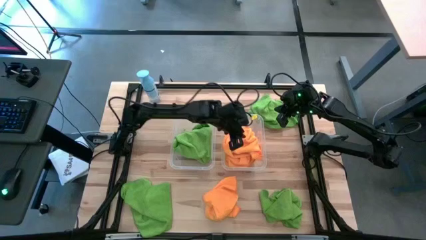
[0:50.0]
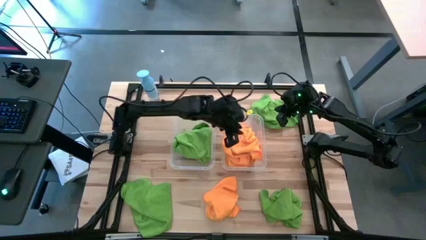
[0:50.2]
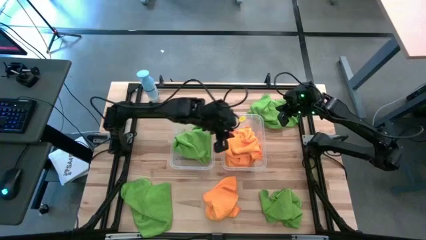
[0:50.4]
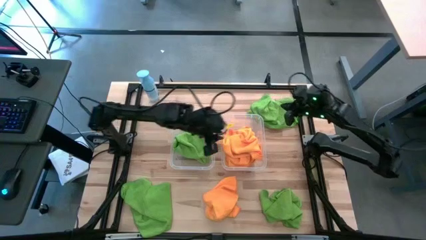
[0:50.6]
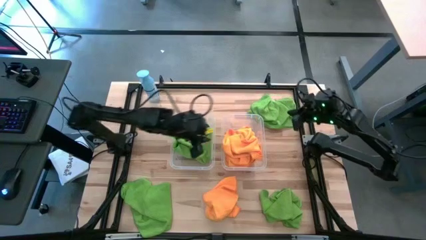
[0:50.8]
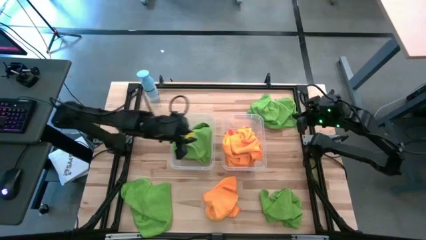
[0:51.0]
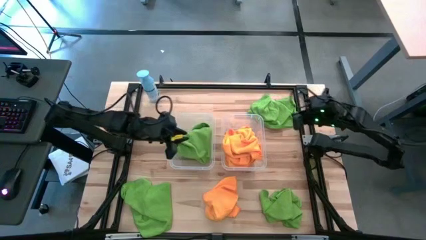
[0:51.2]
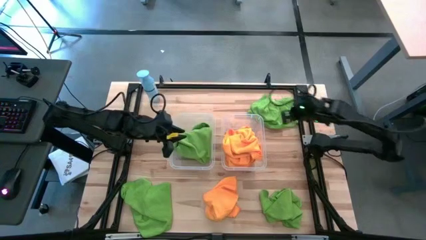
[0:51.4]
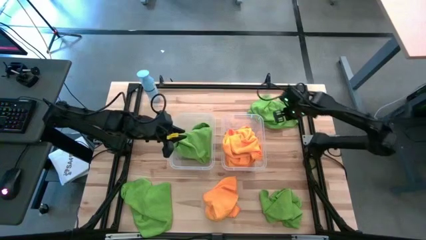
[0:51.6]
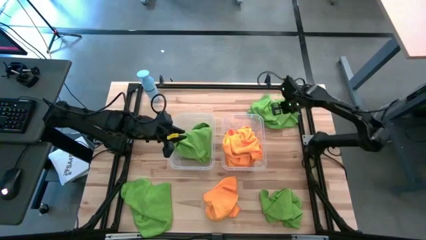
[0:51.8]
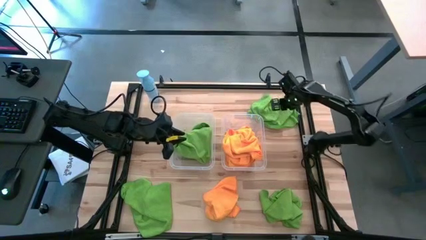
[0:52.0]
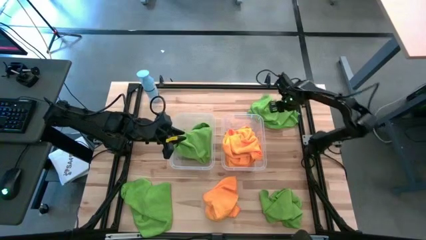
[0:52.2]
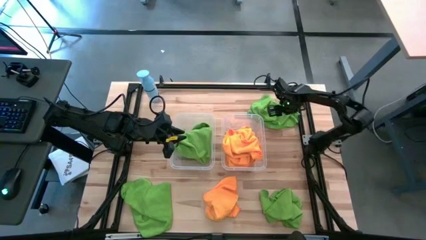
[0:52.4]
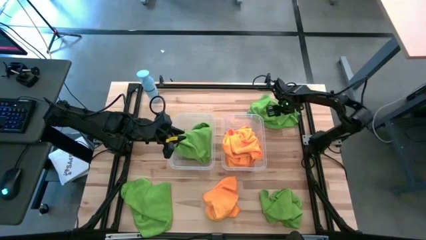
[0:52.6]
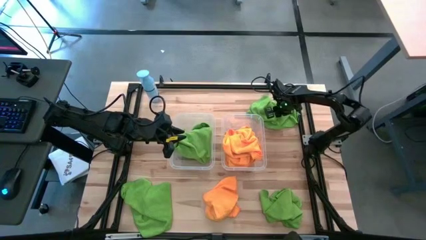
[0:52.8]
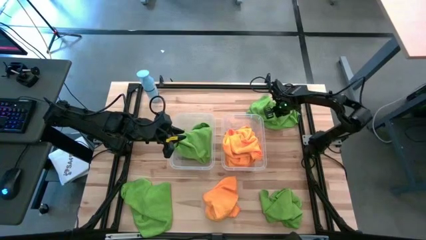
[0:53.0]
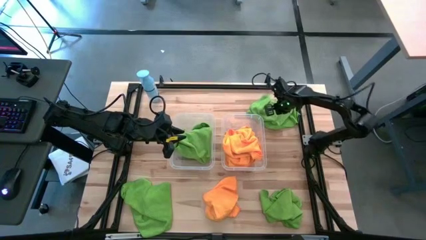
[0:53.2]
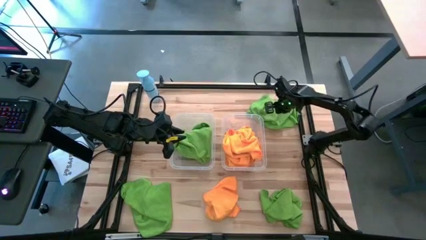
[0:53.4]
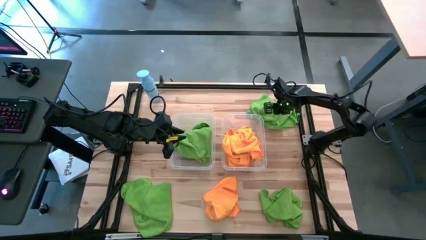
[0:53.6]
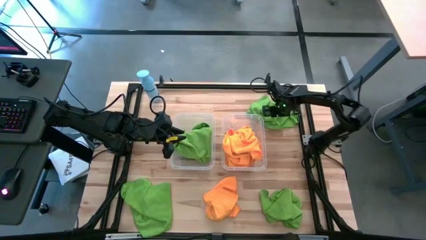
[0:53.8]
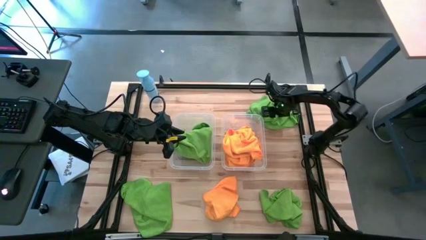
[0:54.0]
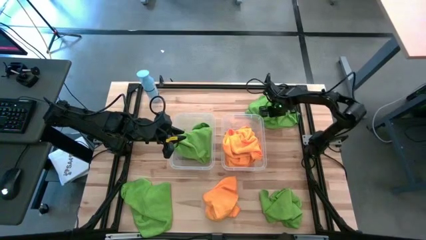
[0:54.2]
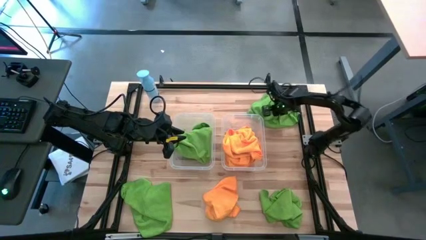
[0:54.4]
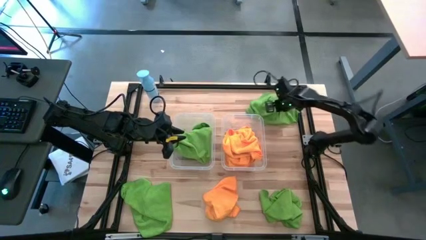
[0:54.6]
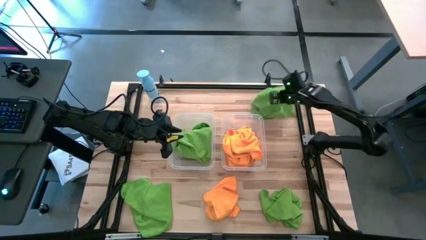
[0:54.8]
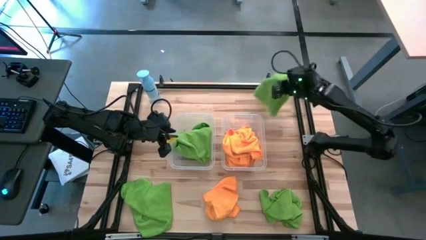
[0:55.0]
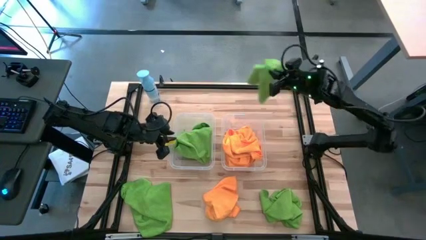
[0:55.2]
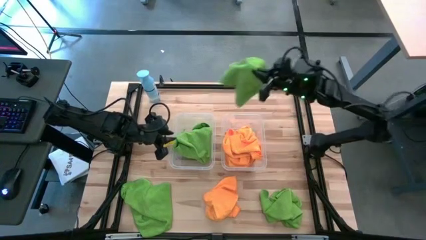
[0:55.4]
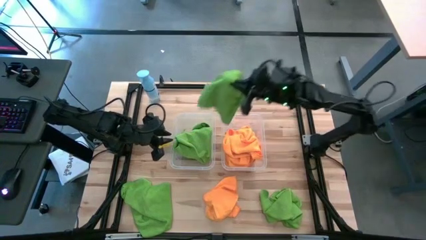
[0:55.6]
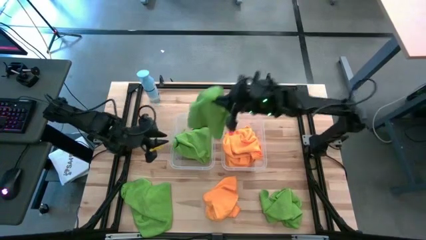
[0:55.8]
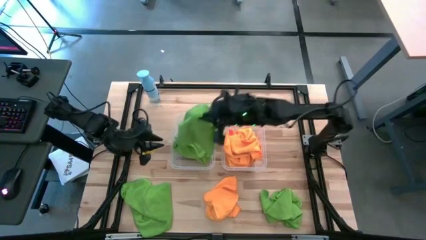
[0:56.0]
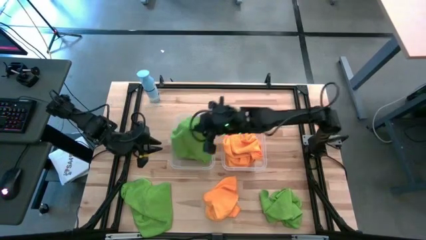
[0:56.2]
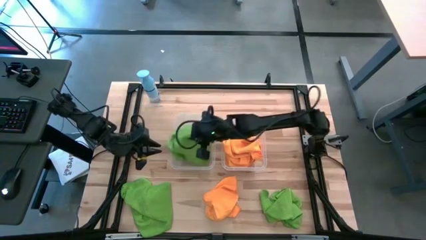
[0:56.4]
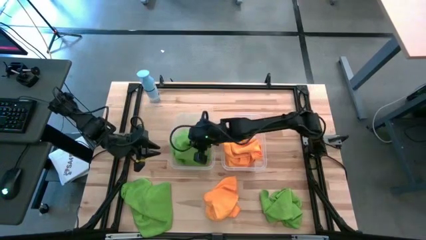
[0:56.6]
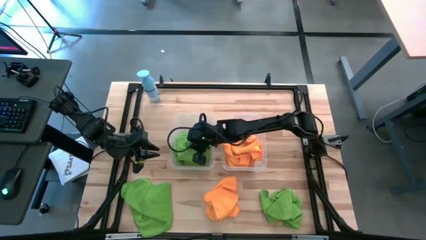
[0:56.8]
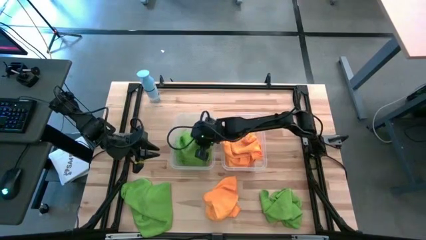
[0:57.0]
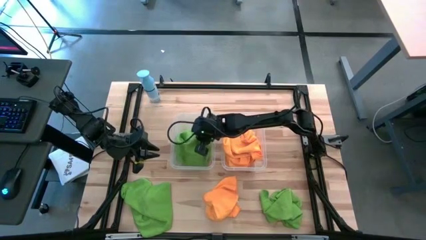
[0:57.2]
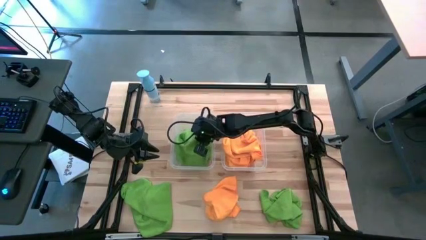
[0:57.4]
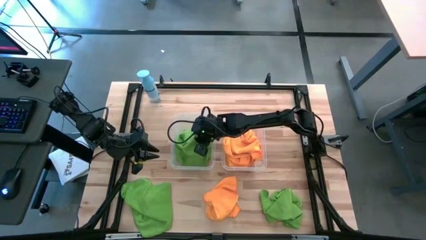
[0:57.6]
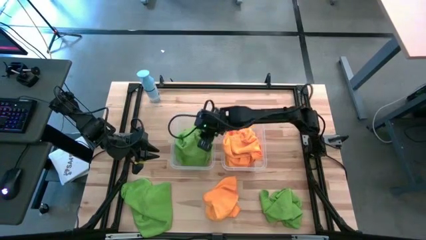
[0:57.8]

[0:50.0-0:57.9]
Task: Sort microfiber towel by color & place in baskets
Put the green towel into the left transparent bin

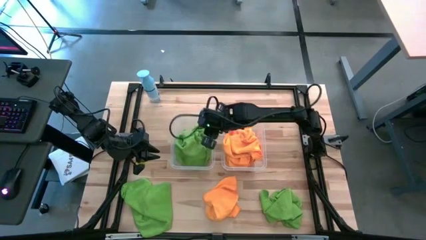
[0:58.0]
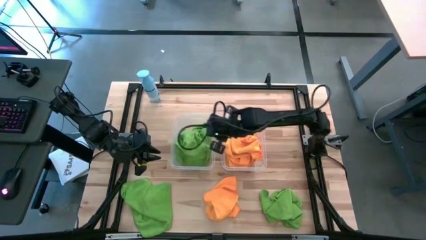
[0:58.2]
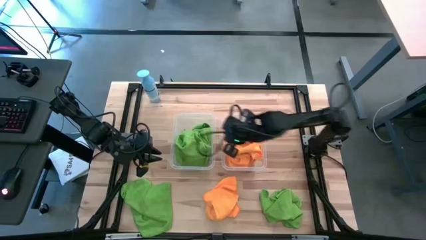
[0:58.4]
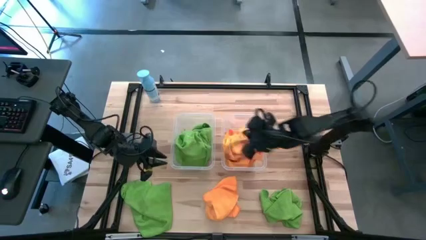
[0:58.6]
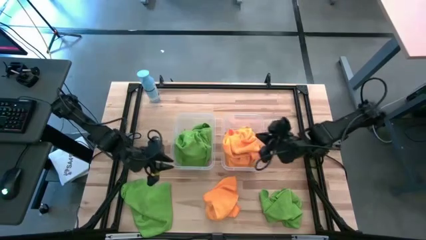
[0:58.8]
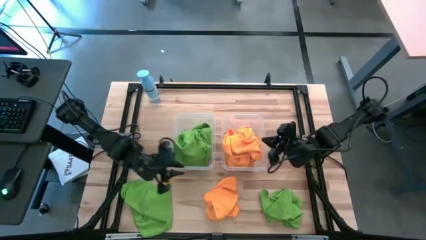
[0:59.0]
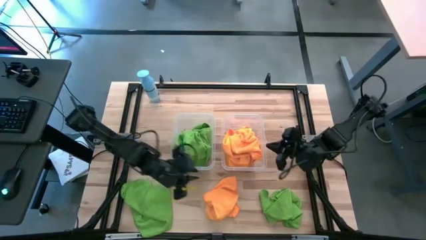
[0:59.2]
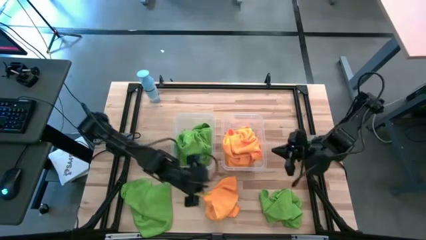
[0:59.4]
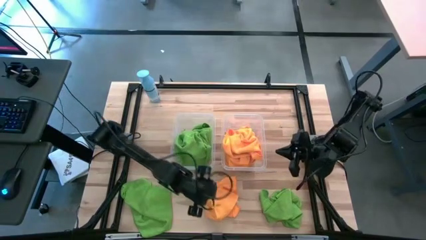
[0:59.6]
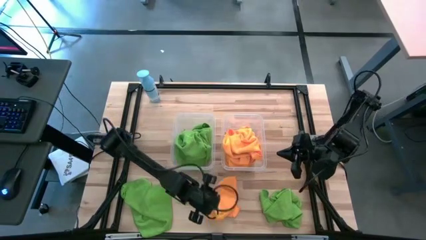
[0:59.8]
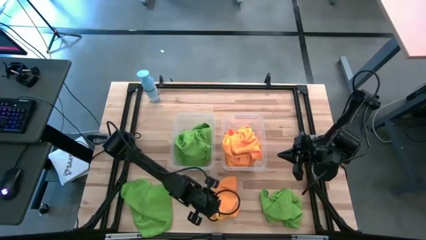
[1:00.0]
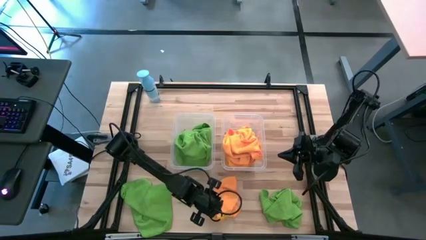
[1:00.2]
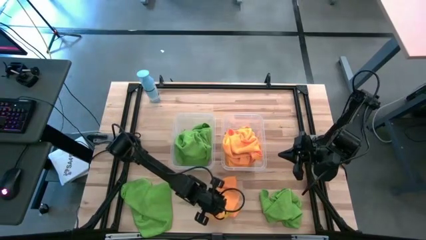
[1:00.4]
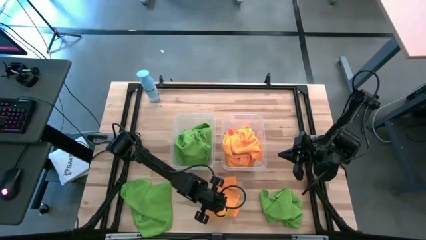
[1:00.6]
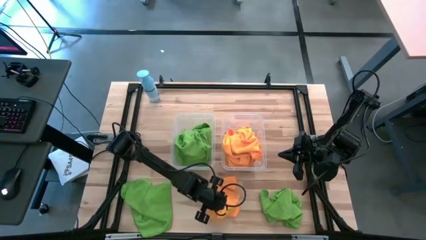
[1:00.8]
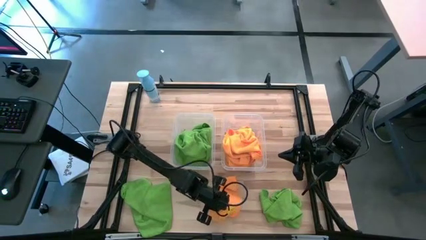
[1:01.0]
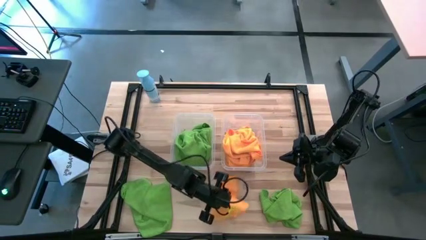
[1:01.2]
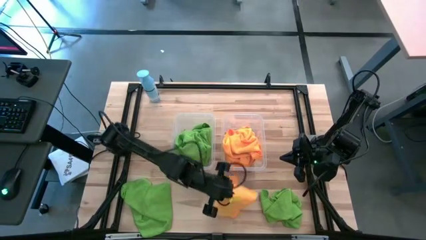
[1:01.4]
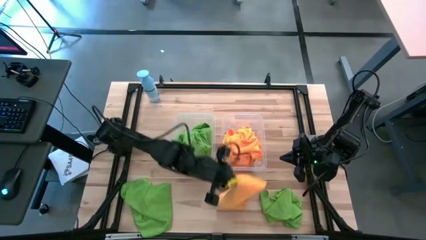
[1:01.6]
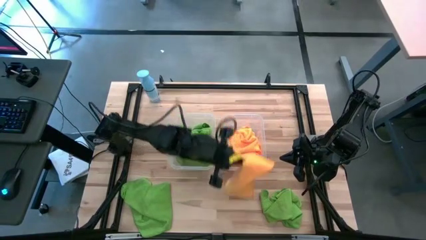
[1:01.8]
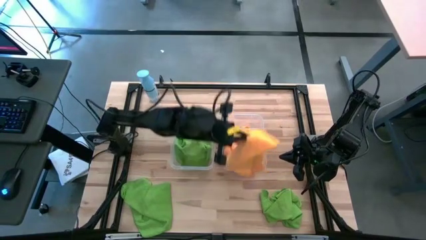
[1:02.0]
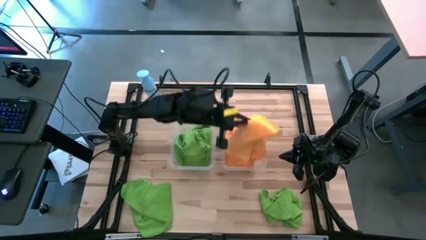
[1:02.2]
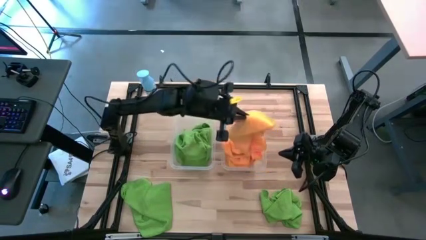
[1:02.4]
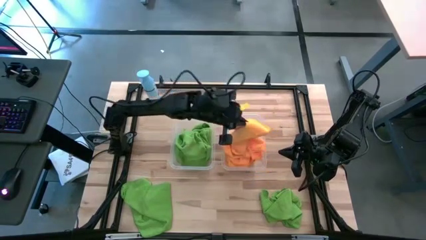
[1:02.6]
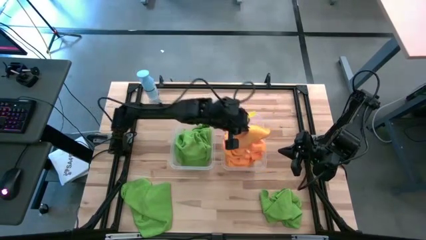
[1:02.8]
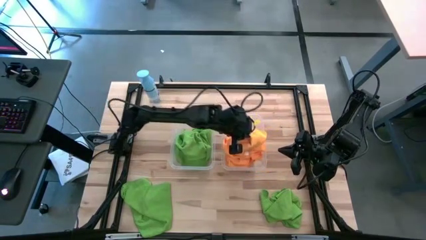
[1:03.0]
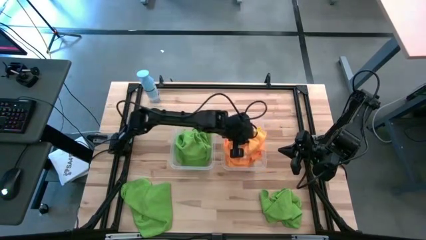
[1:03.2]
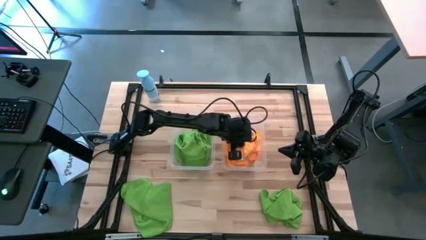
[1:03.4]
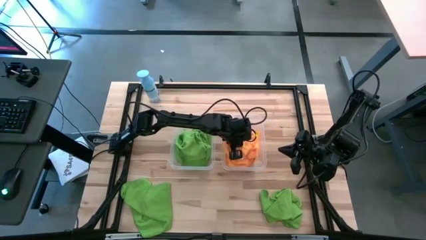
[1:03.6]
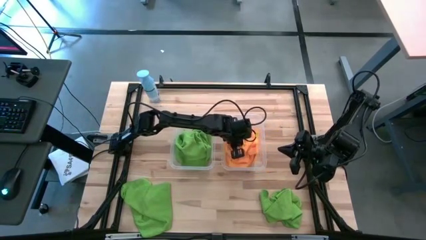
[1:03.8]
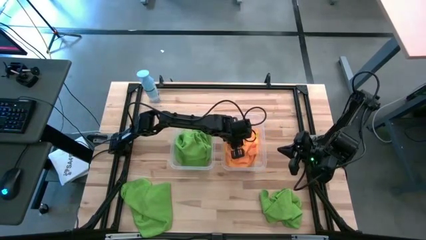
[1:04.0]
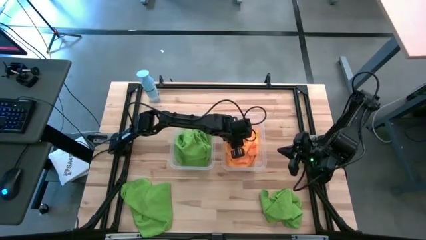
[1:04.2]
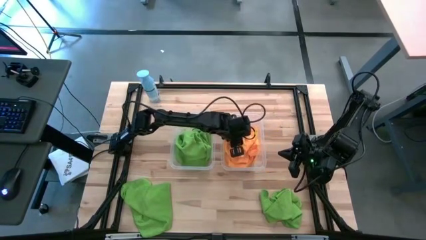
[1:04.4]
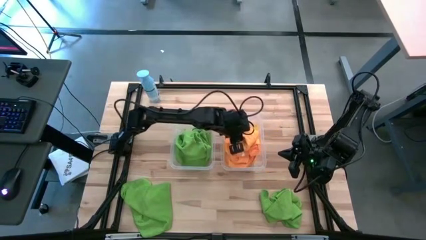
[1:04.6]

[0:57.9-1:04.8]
Put the orange towel into the right transparent bin

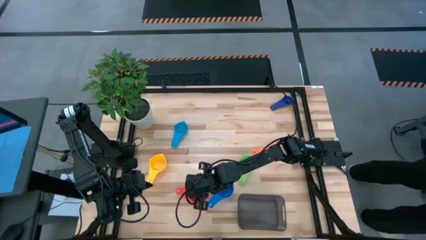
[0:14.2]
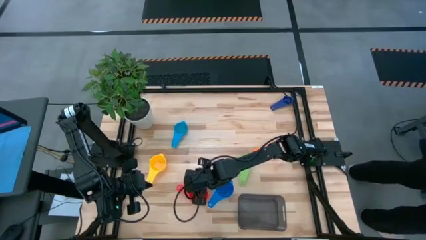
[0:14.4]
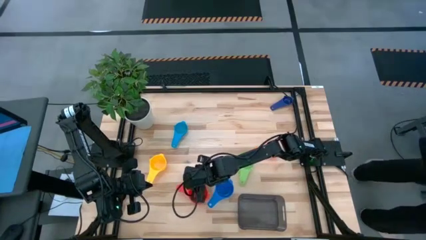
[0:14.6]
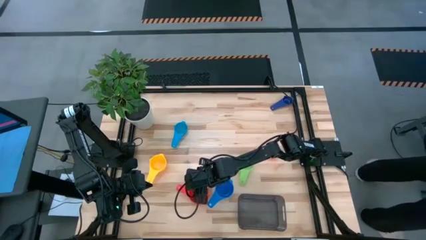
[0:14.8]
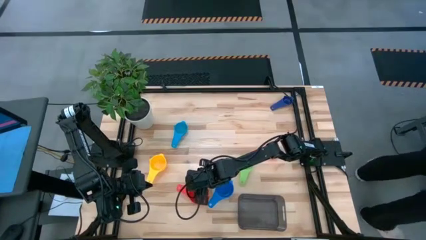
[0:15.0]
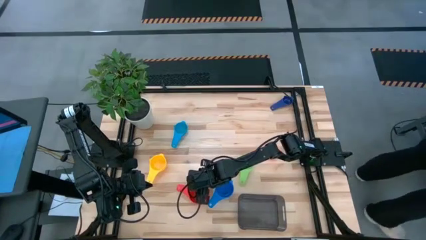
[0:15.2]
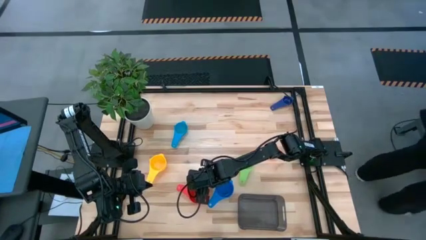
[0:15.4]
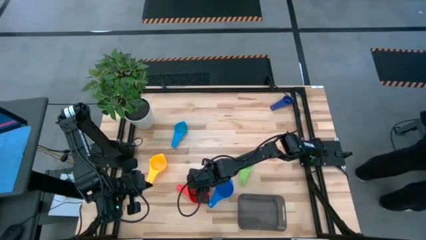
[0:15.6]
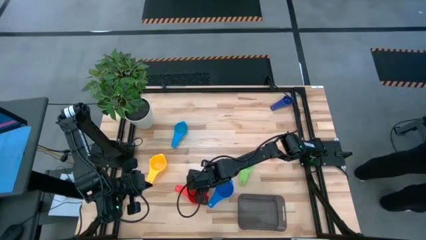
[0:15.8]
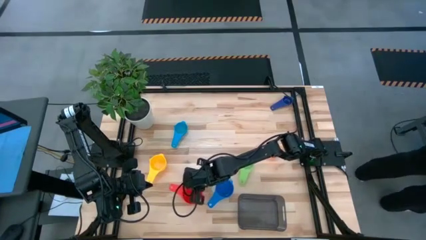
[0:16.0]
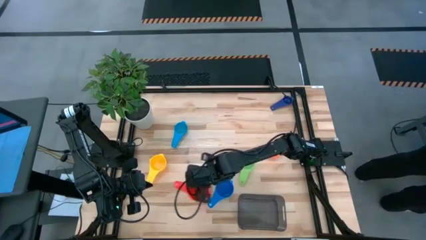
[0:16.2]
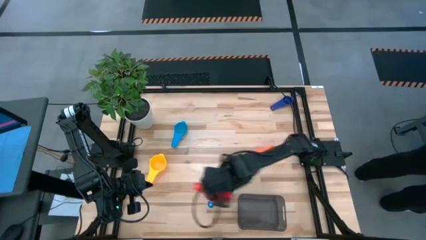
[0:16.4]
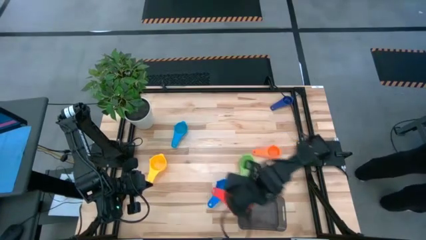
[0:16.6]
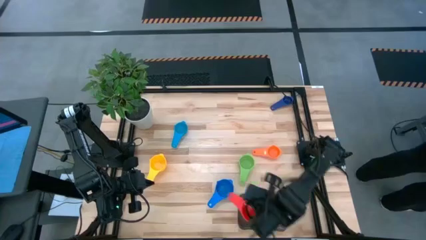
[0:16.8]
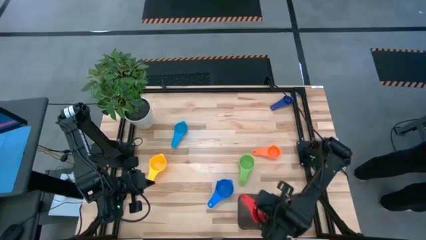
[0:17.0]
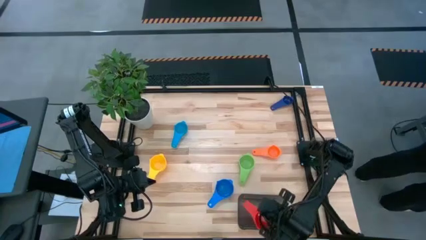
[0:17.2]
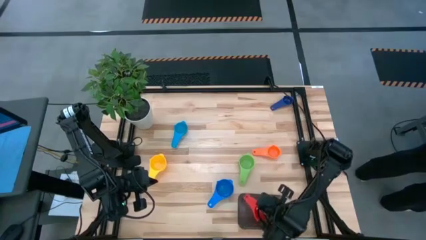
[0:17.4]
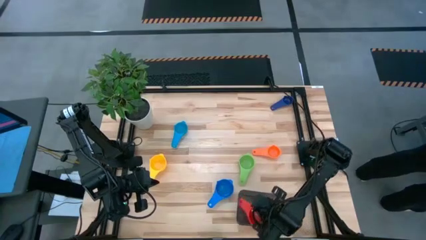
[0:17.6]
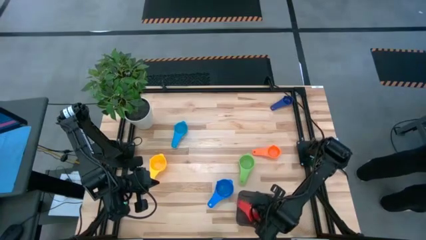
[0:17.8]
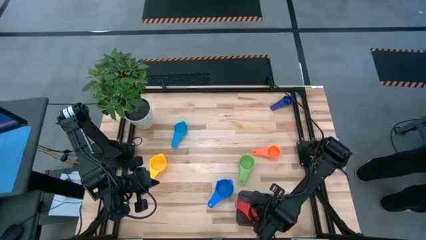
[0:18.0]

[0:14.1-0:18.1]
Task: Nest measuring cups in basket
Put the red measuring cup into the transparent black bin
